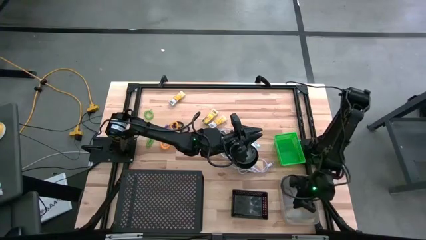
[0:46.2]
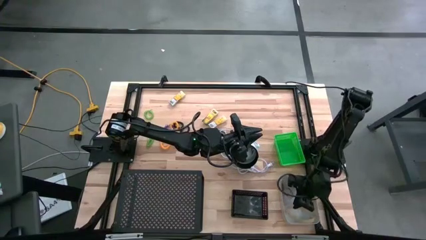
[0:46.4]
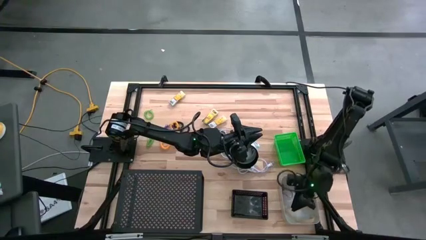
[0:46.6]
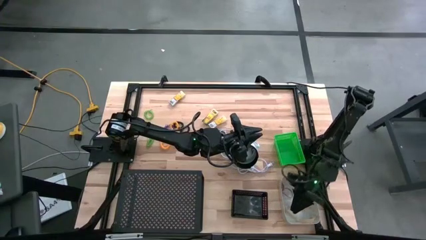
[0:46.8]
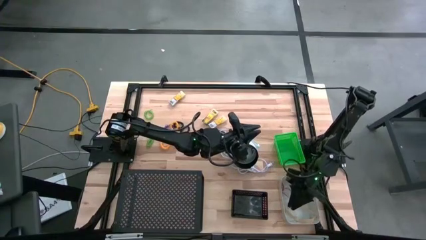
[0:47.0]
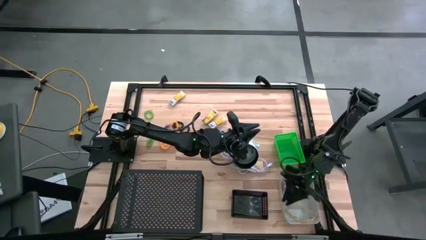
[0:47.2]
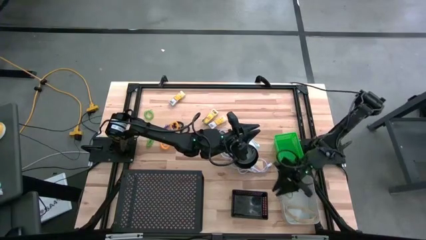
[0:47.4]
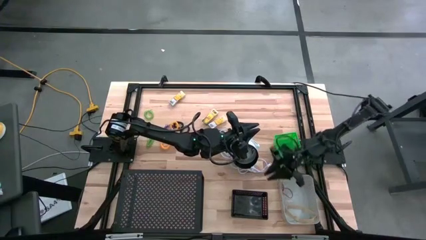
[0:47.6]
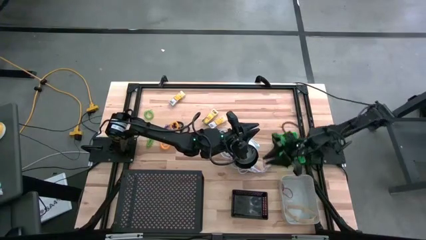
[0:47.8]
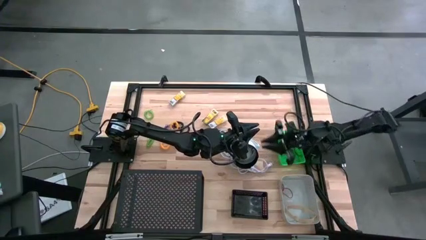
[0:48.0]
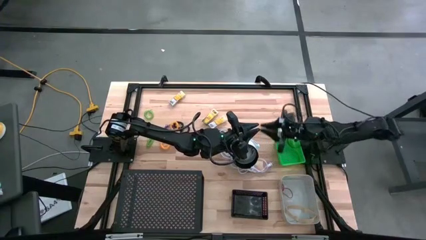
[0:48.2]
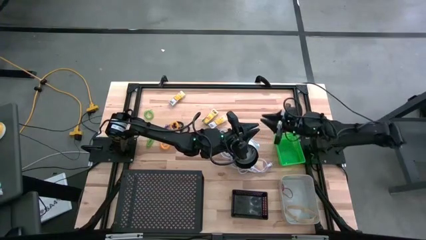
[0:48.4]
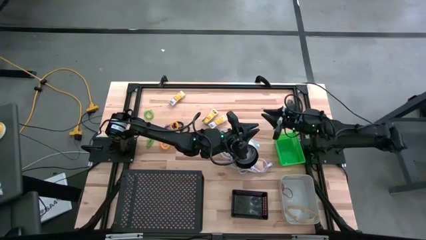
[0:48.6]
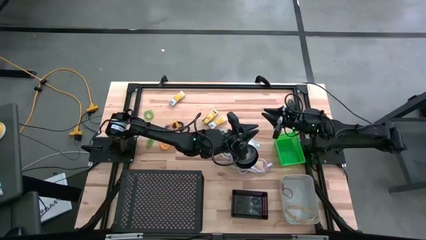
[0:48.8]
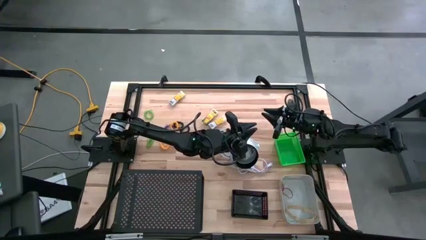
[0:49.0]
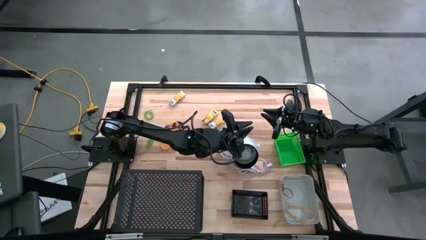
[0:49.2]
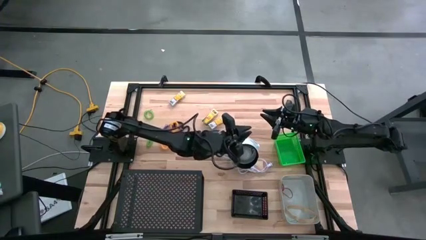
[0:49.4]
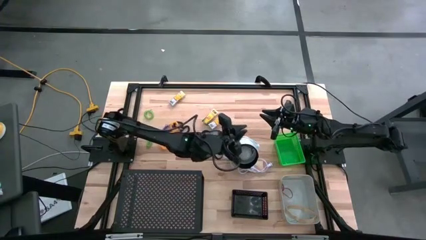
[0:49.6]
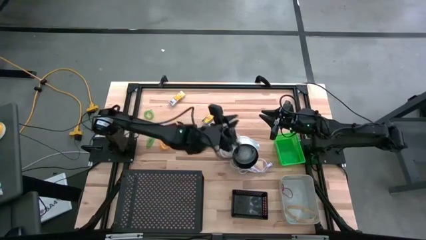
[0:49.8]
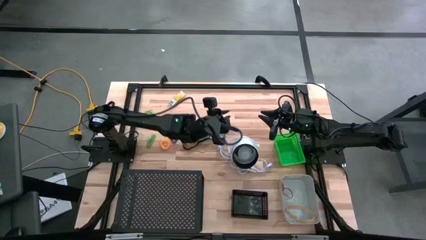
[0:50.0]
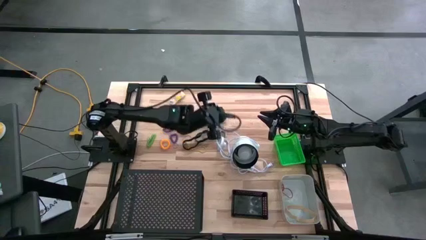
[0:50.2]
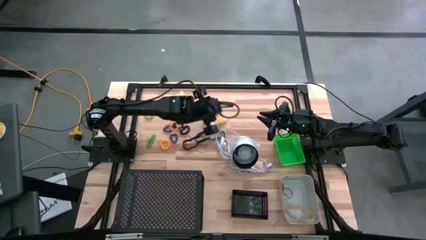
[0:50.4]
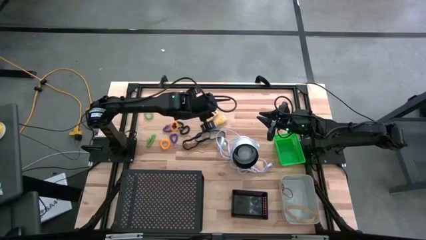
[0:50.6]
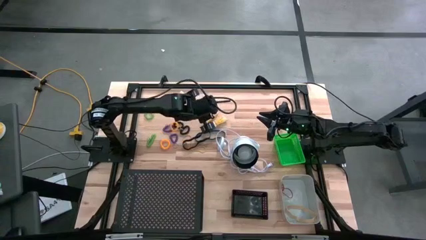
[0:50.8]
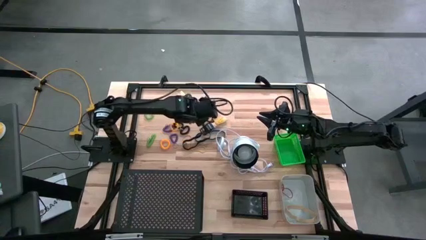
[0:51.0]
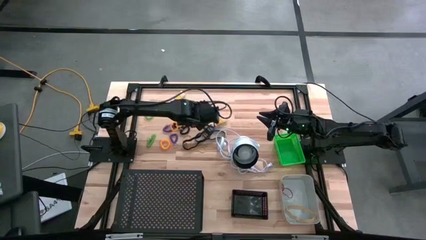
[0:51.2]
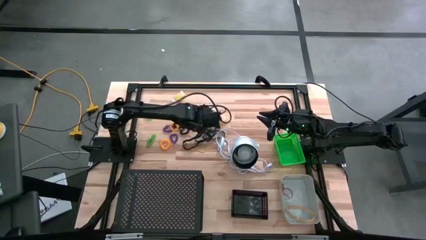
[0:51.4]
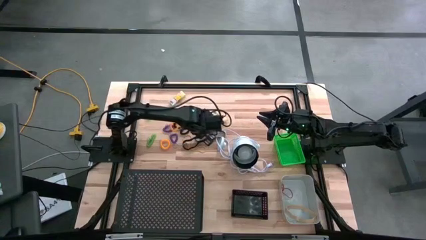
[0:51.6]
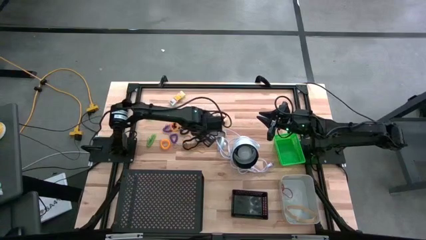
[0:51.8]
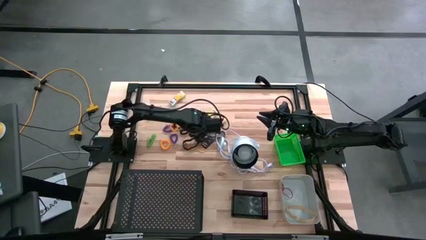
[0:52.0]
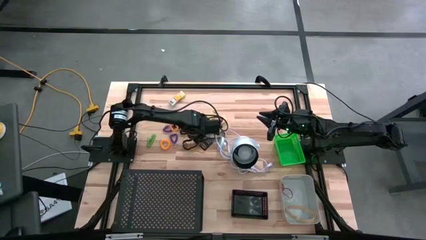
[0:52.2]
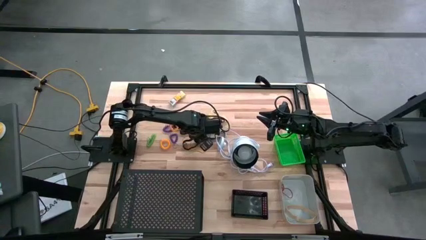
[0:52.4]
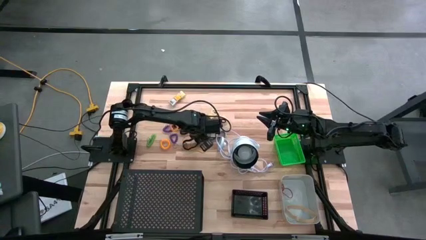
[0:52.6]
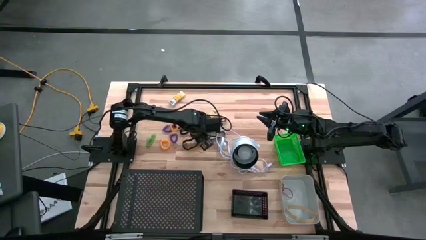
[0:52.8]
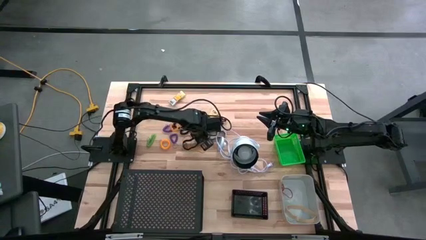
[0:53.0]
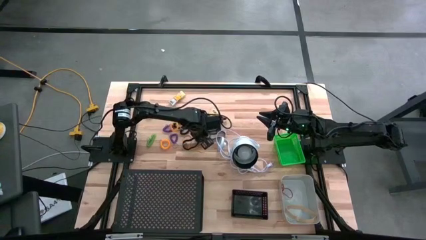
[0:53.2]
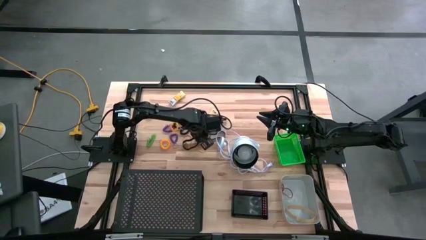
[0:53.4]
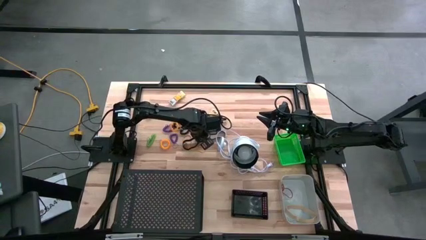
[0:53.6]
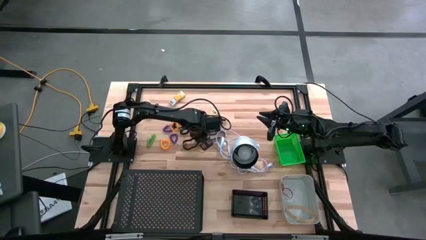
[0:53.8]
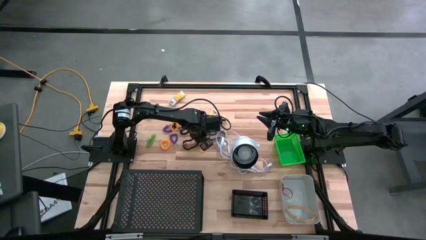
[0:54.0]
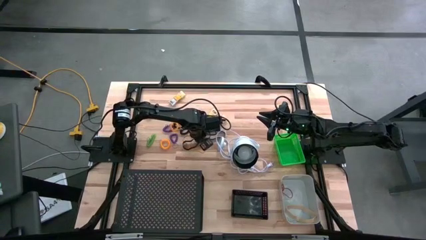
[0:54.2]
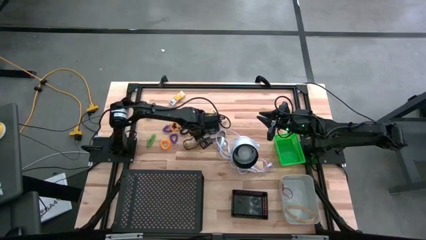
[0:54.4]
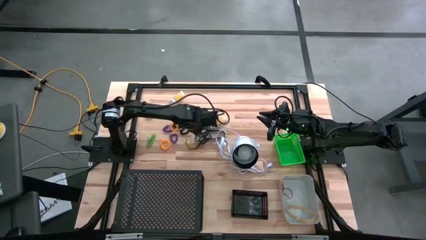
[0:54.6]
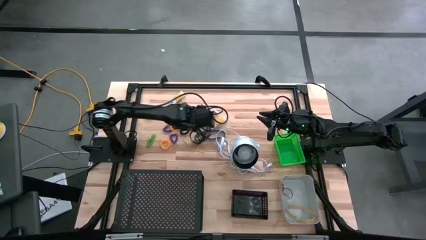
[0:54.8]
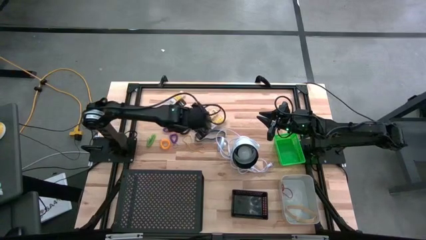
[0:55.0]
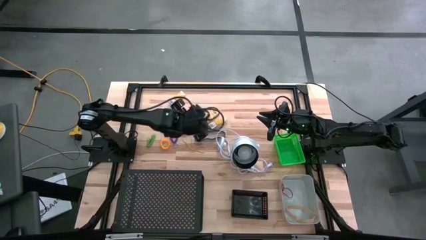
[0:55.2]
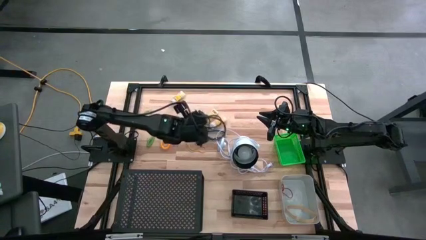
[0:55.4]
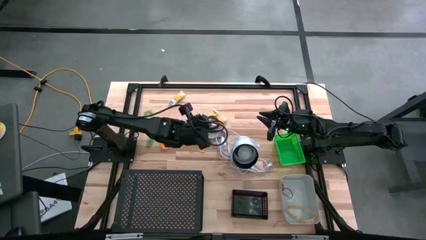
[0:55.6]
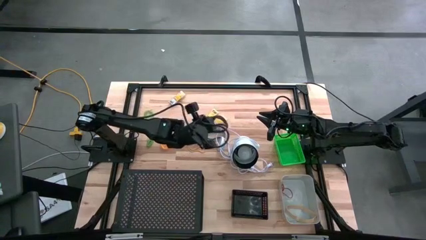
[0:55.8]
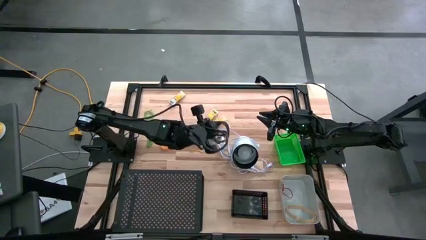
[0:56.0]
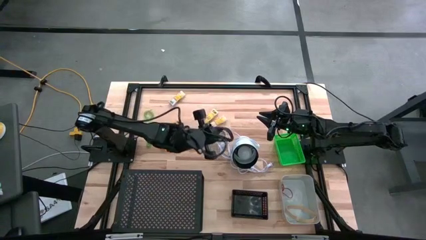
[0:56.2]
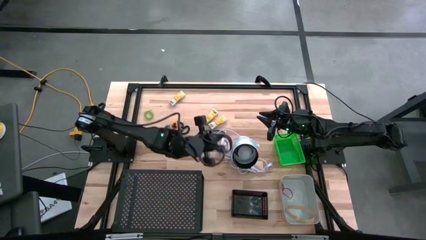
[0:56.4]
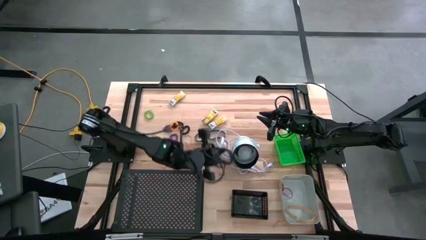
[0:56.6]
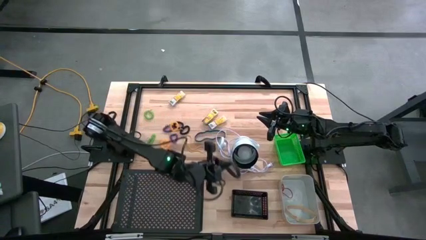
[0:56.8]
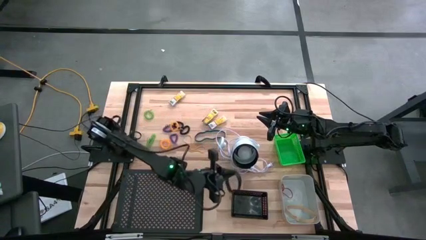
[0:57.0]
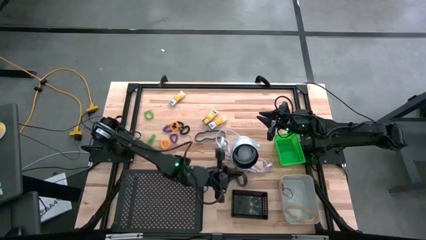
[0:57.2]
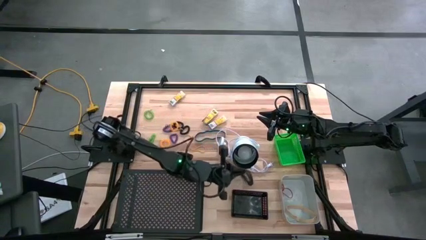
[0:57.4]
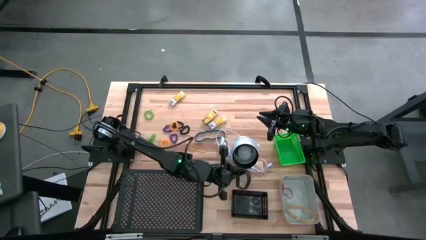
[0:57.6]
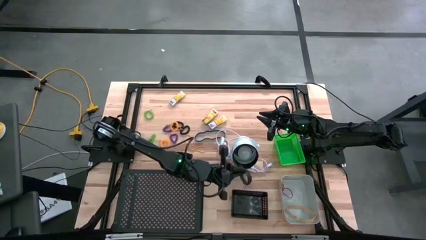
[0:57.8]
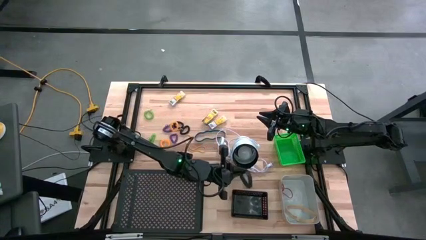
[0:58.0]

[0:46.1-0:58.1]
Task: Pick & Place Office Desk Supplies
Put the black rubberband into the gray bin

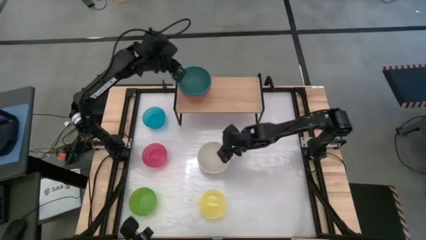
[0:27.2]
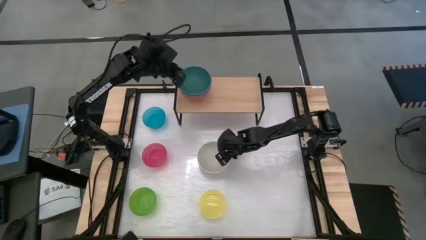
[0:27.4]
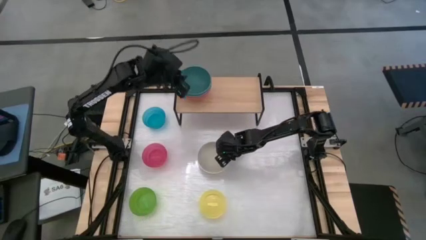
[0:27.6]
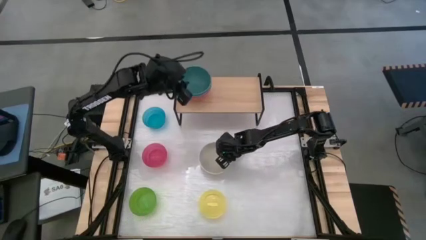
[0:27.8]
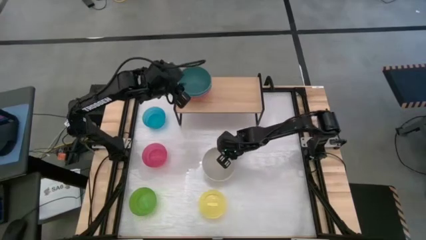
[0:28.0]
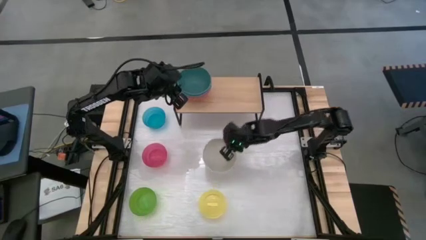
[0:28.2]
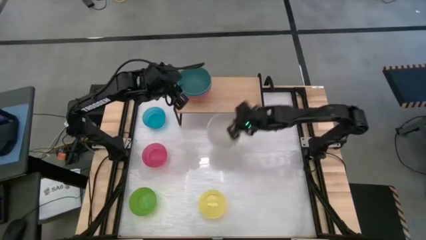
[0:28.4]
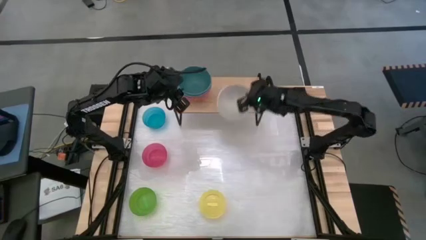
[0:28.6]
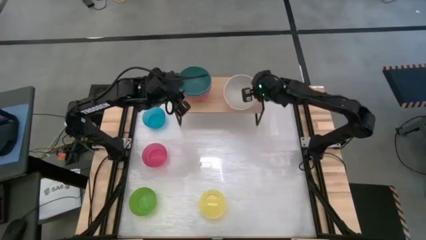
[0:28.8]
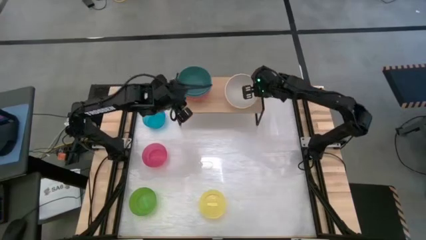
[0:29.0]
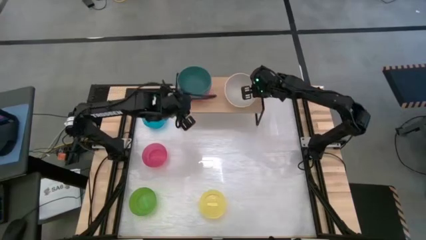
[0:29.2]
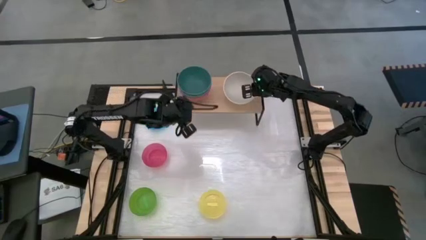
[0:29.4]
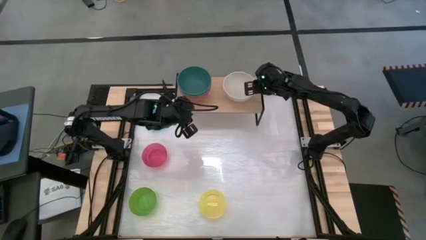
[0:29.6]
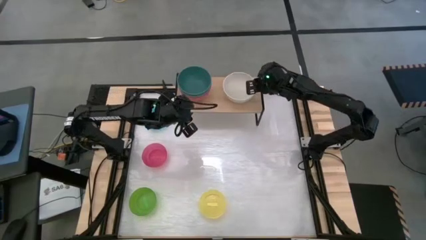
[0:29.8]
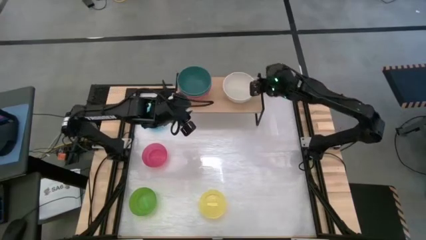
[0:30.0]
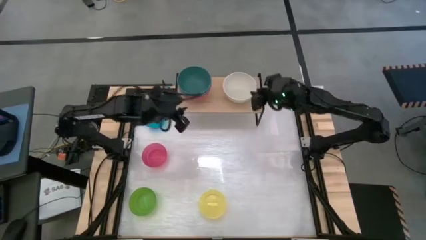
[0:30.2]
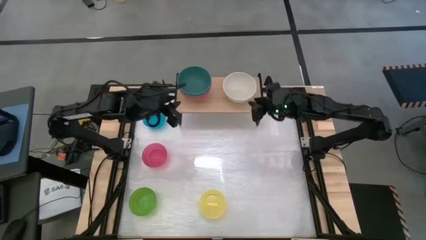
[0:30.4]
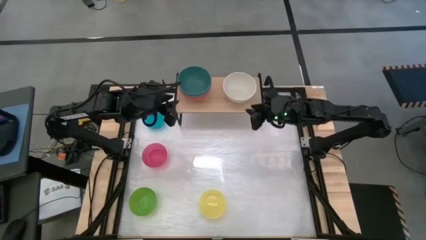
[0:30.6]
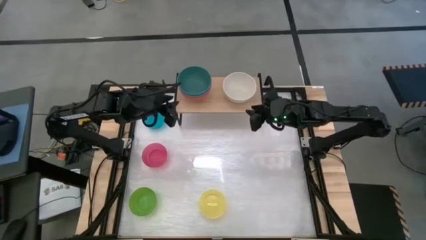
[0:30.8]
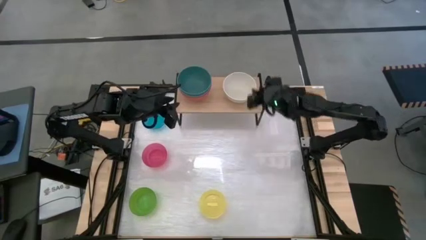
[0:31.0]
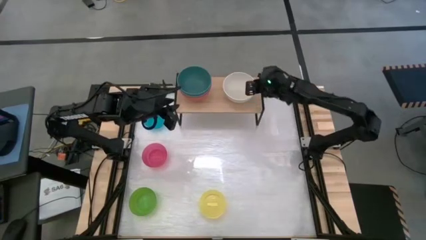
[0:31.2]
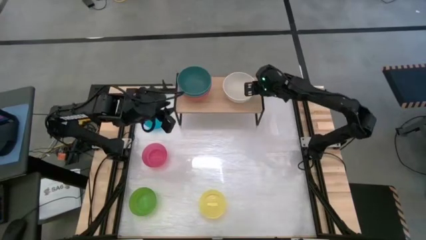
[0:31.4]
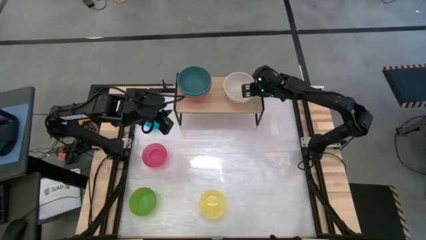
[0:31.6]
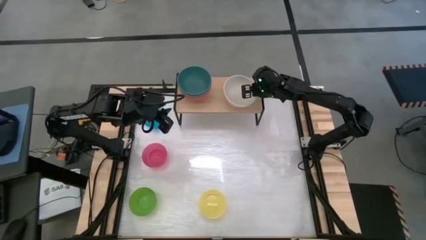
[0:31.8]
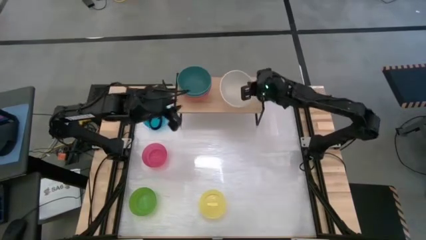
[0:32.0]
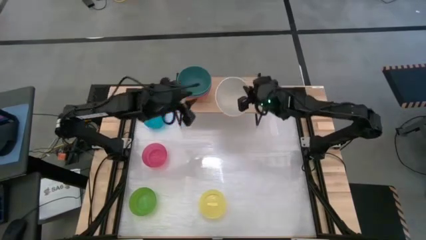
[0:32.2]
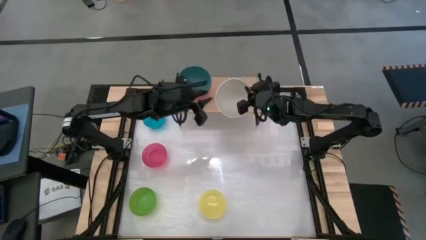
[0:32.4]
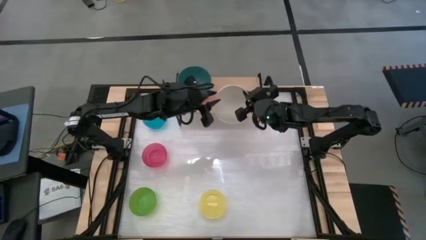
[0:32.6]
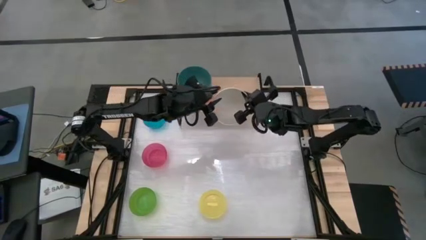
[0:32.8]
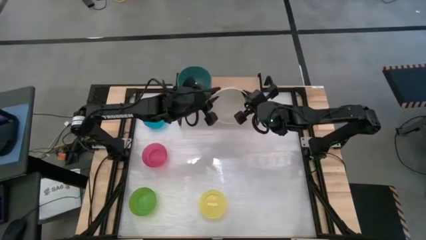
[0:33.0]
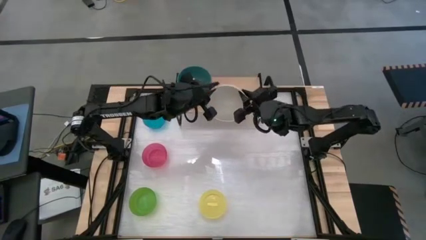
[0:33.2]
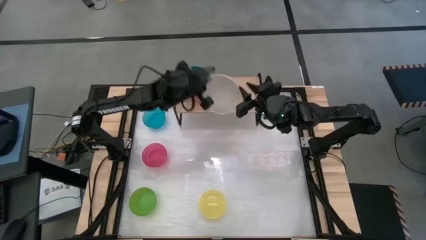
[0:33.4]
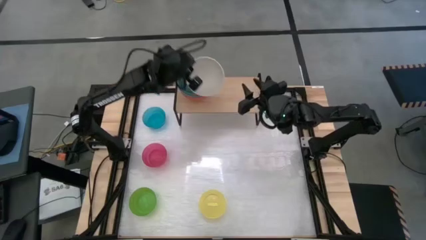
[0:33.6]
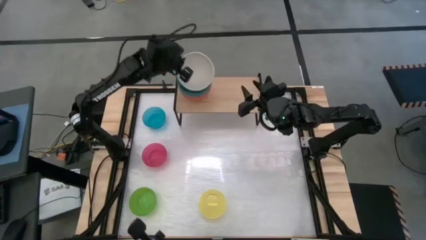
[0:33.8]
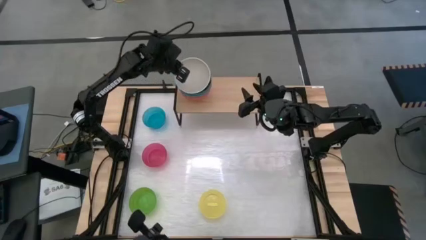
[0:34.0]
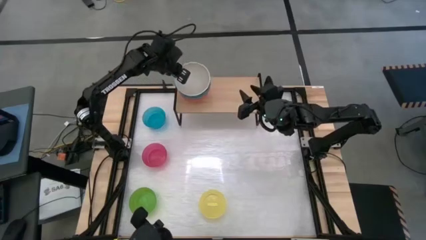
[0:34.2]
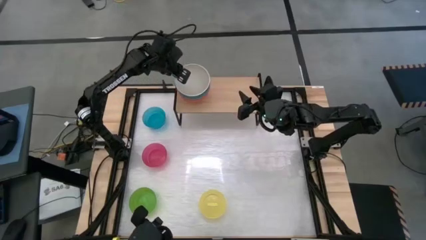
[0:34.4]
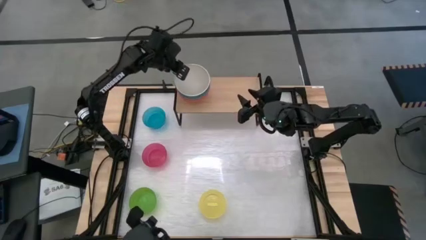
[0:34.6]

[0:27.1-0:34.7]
Task: Place and stack bowls onto a shelf
Stack the white bowl on top of the green bowl on the shelf
